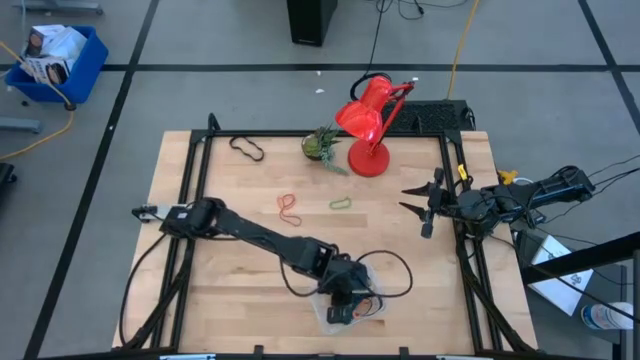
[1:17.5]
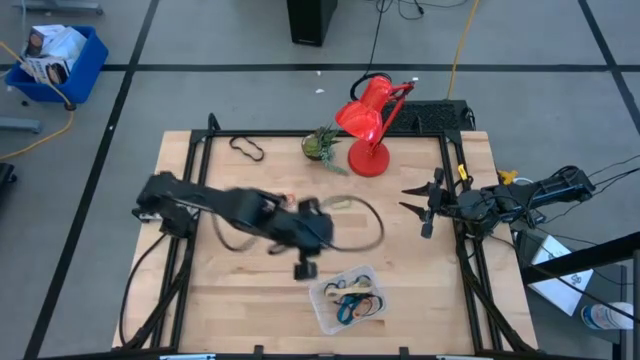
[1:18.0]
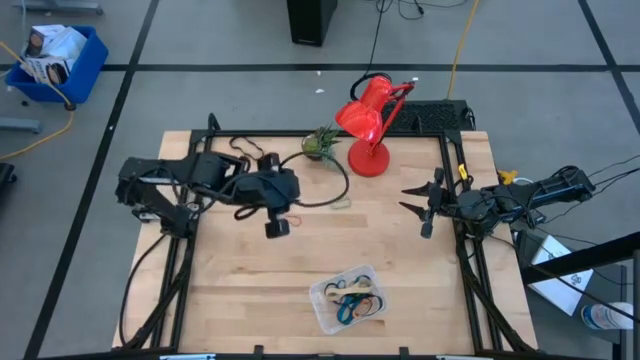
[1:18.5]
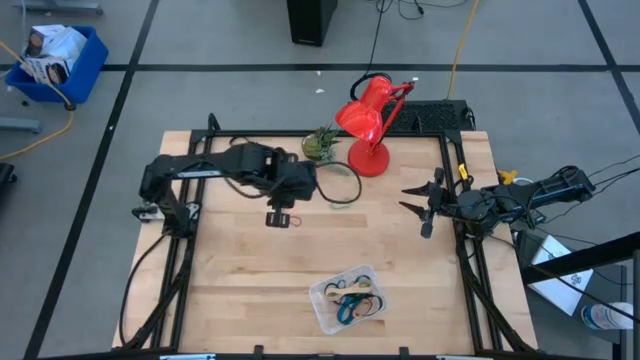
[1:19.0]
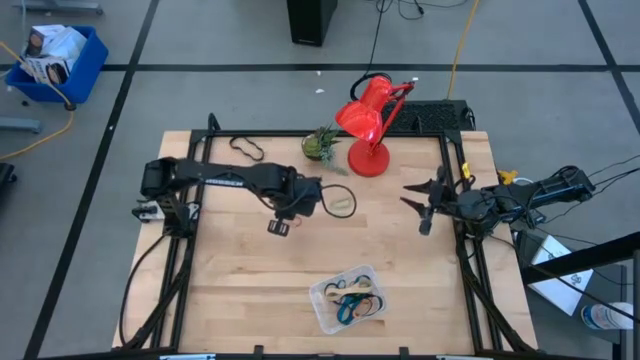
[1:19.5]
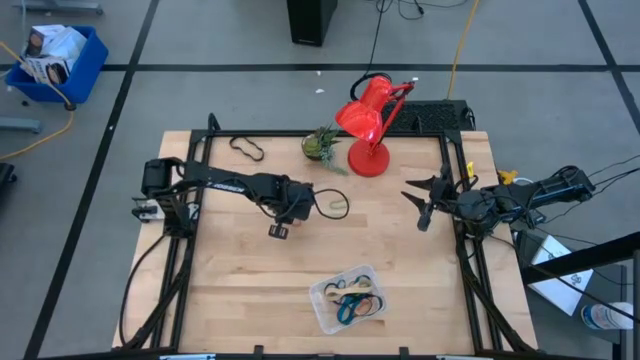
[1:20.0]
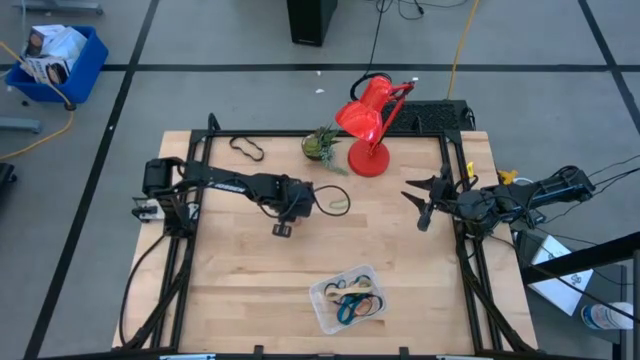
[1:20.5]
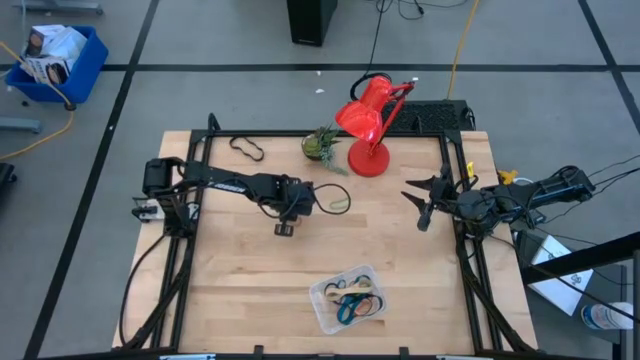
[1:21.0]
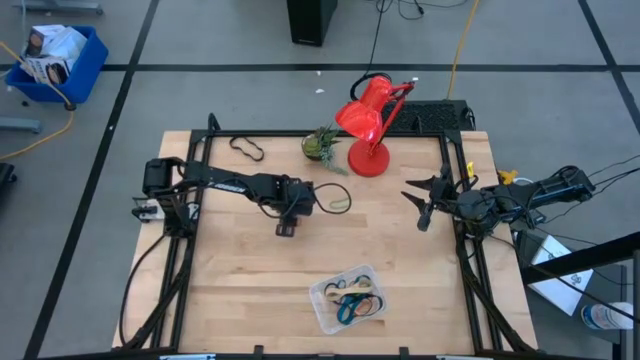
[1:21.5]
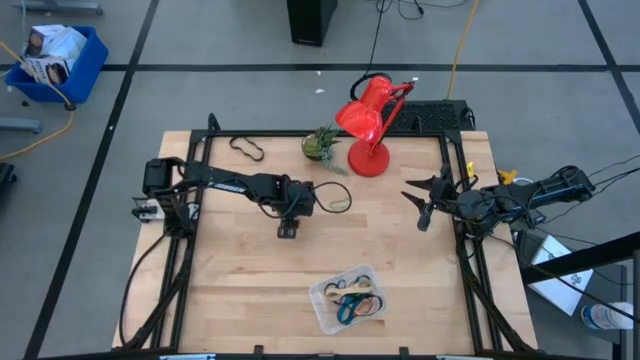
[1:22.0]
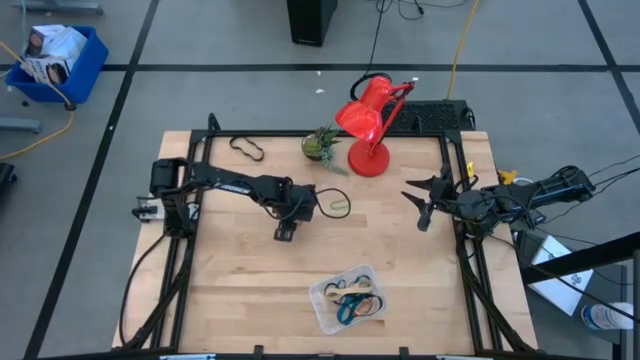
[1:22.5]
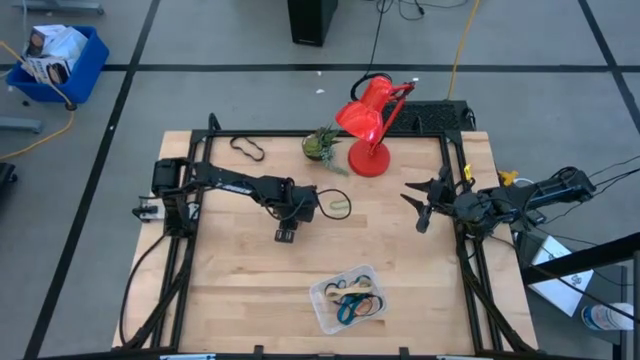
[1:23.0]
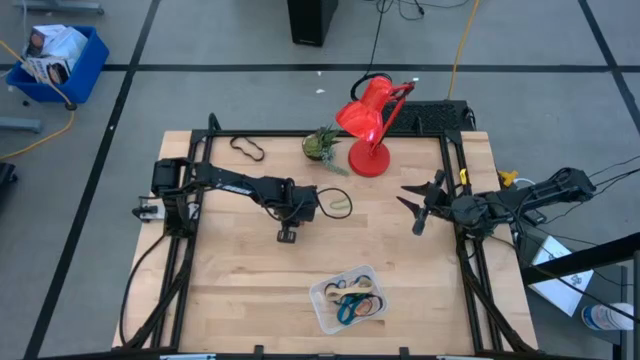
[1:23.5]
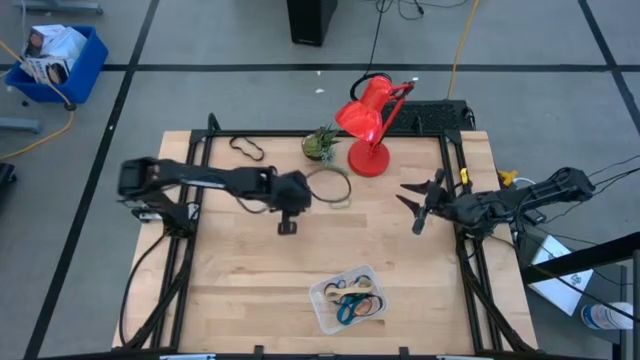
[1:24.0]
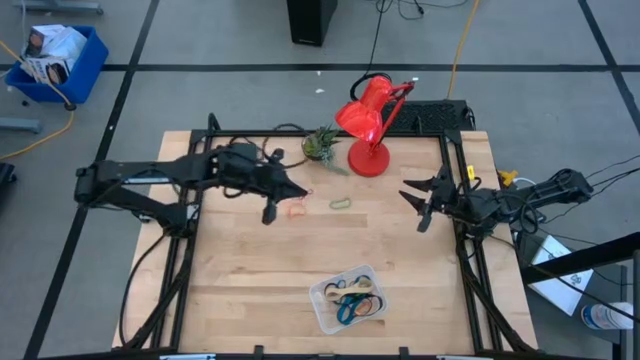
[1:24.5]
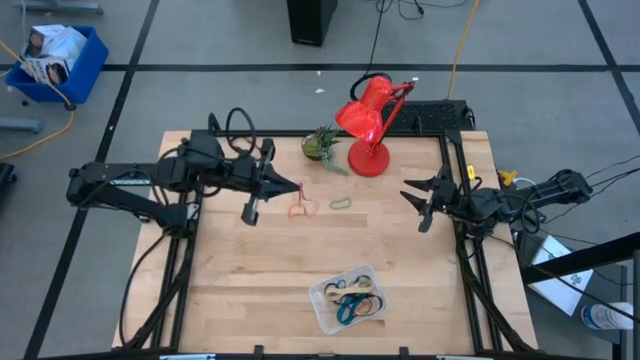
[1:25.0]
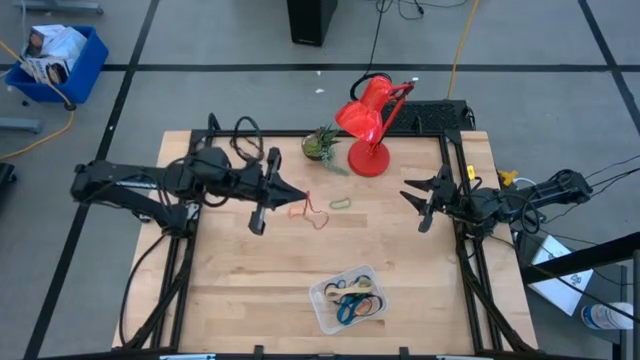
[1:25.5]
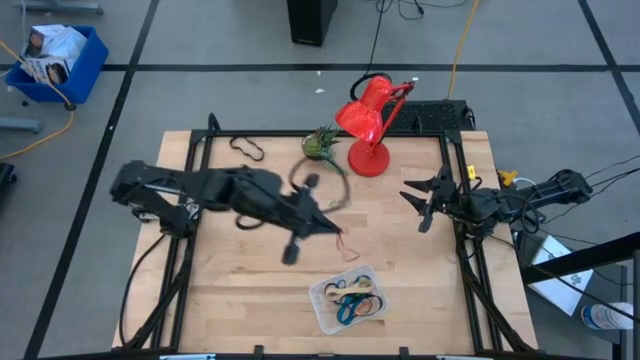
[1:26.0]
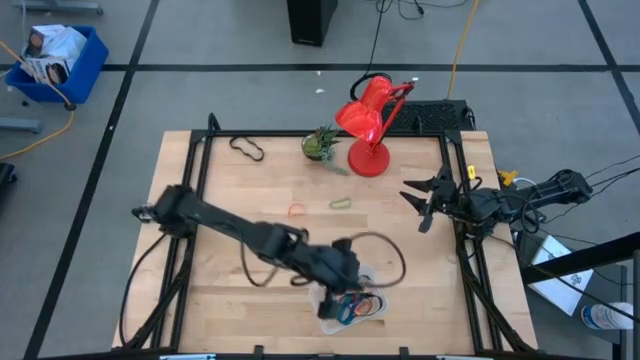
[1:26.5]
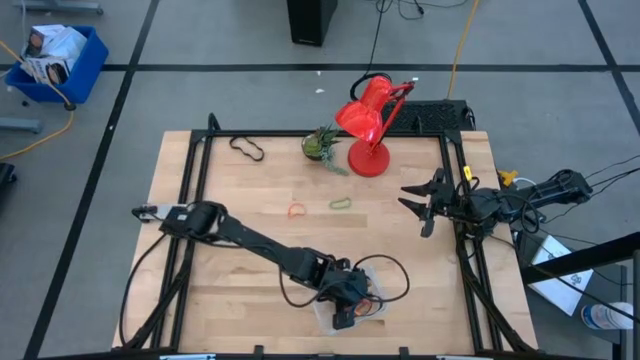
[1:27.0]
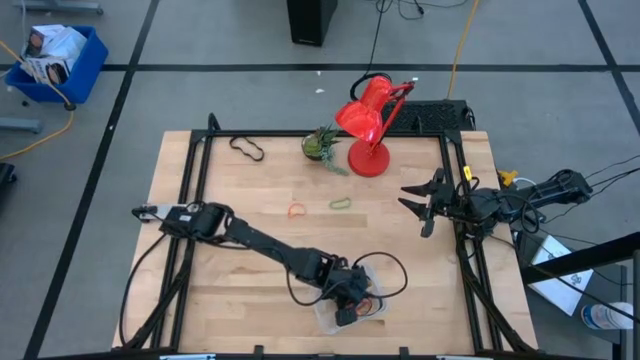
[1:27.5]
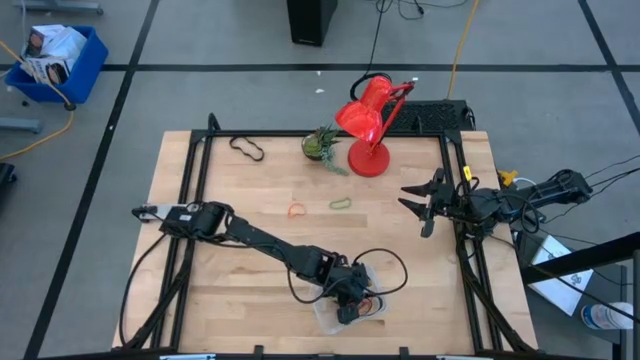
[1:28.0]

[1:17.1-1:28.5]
Task: Pick and place rubber bands into bin
Put the red rubber band into the transparent container

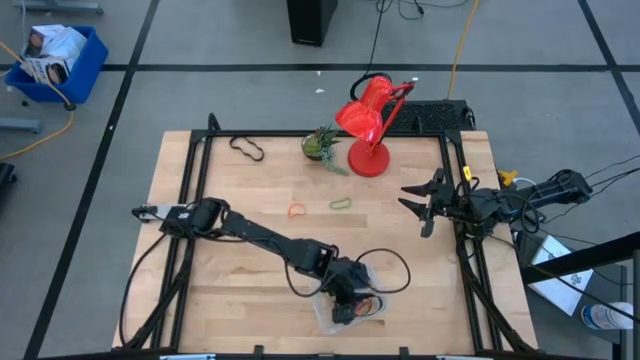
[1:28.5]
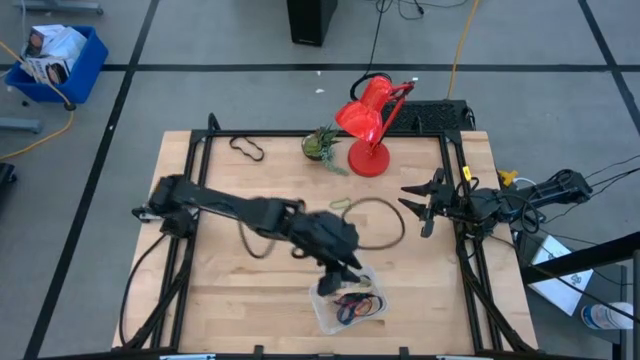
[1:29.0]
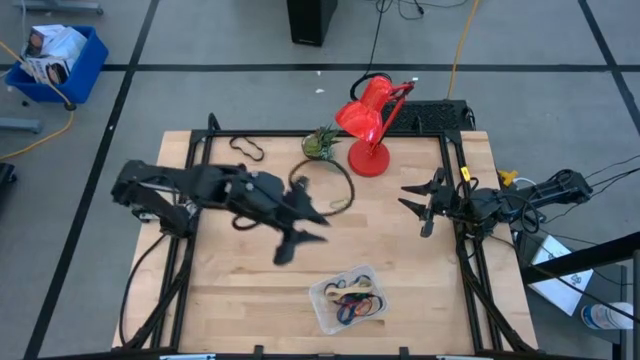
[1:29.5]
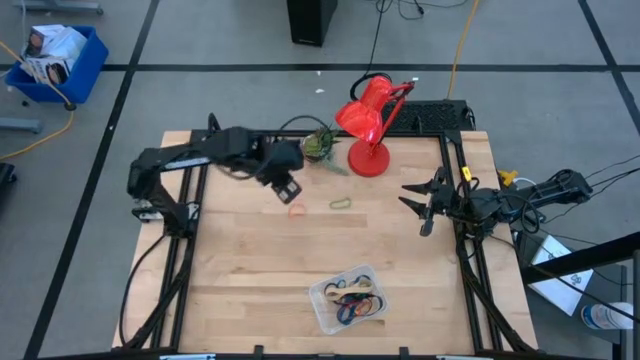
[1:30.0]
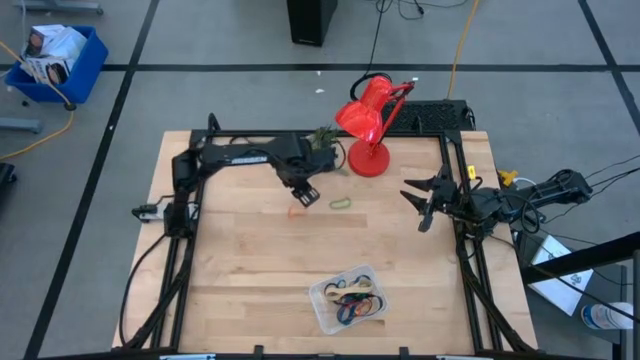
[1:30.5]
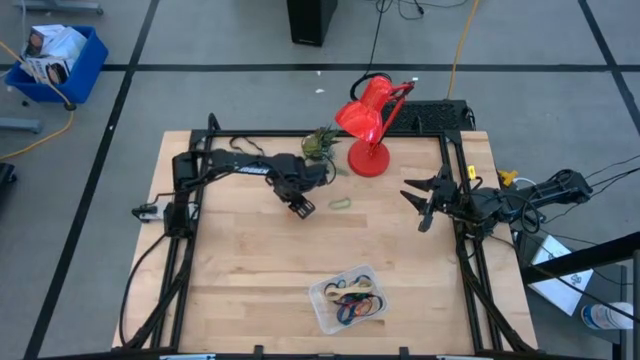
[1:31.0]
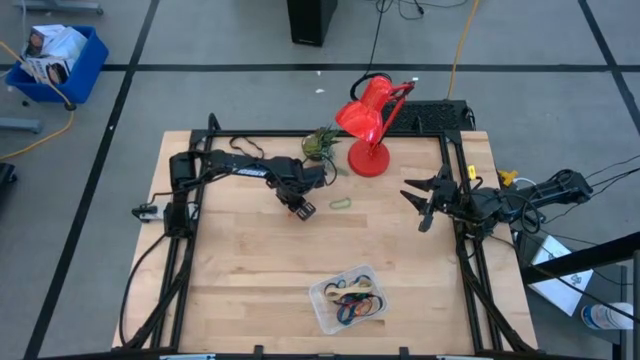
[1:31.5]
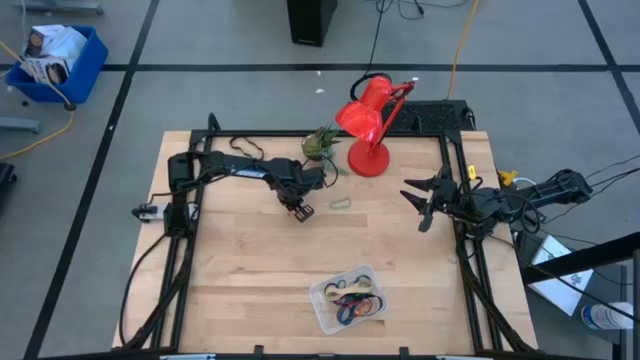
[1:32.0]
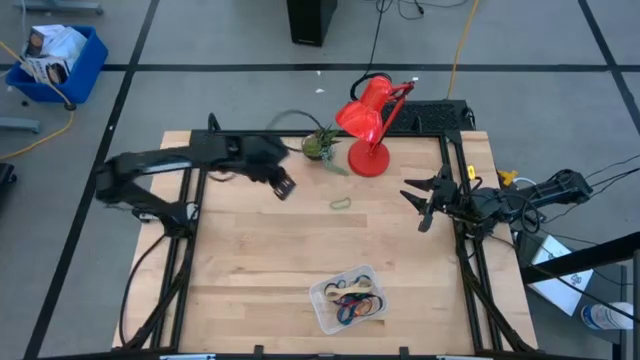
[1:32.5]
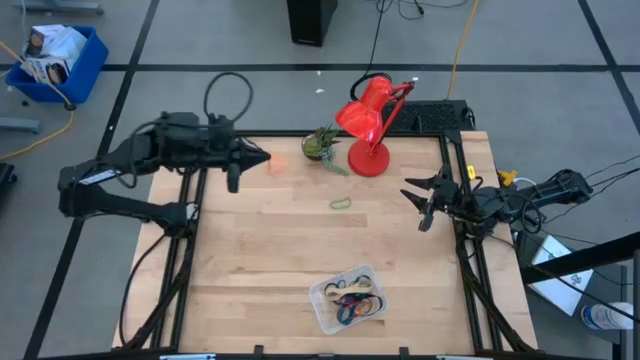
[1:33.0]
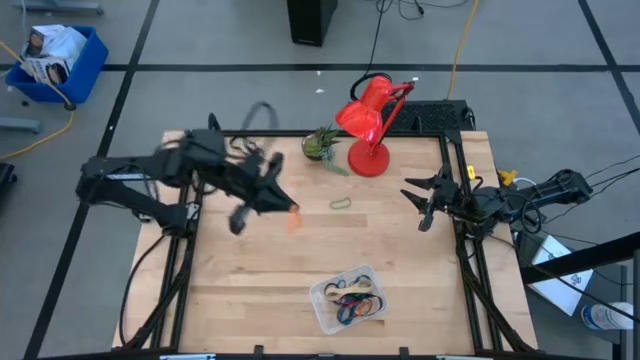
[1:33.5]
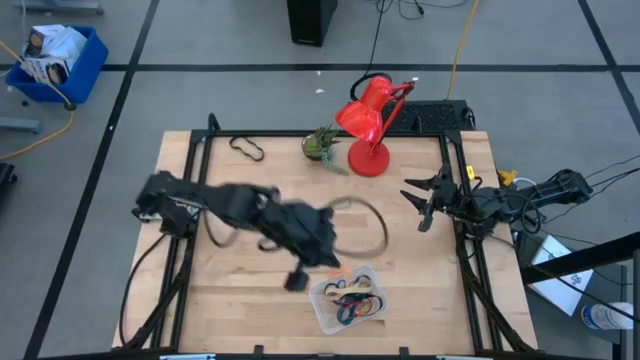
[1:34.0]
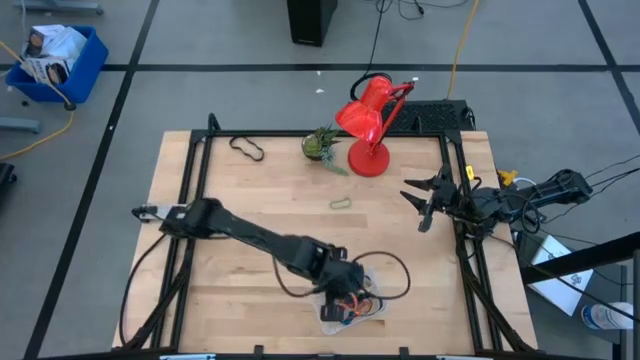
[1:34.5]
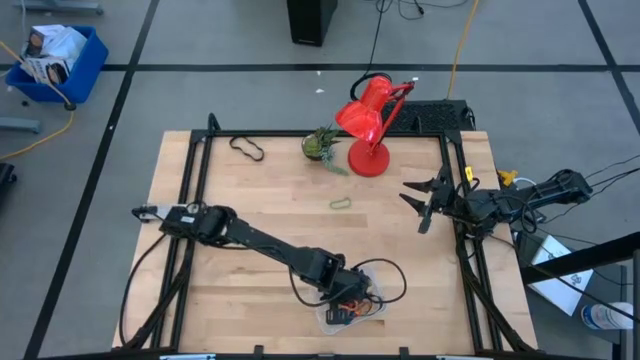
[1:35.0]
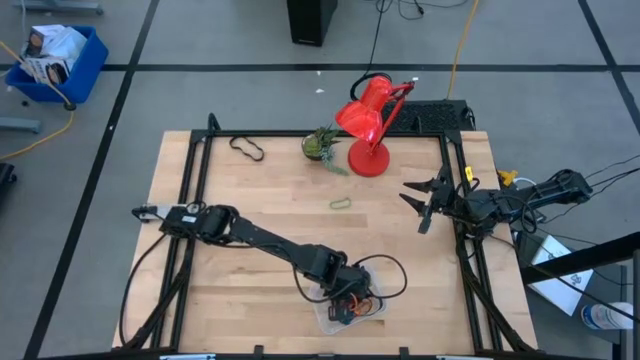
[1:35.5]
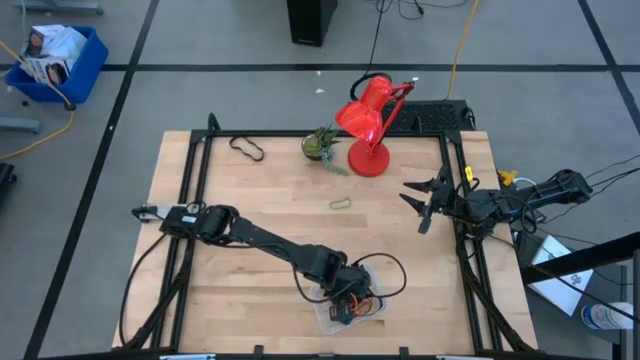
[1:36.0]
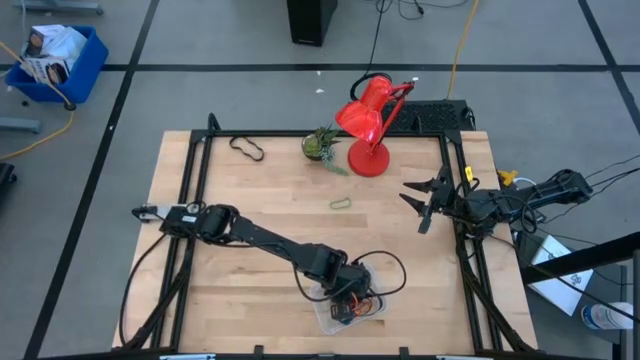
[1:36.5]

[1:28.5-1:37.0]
Put the orange rubber band into the transparent container

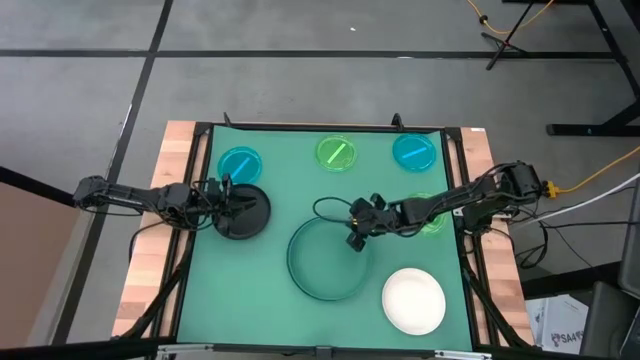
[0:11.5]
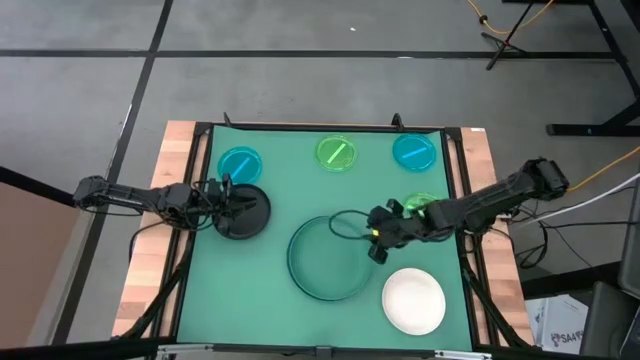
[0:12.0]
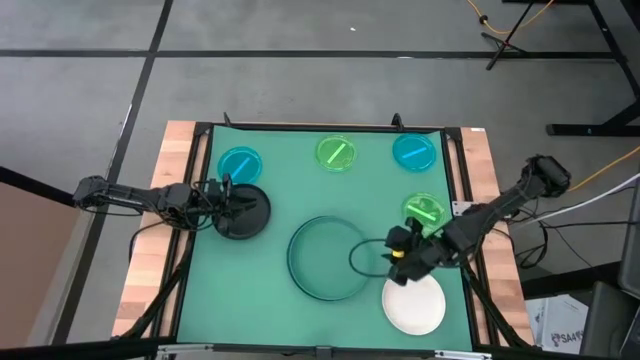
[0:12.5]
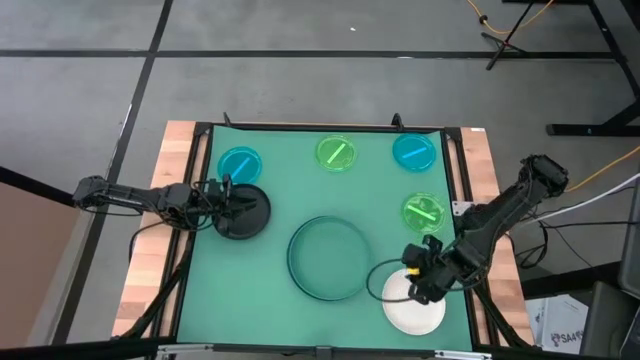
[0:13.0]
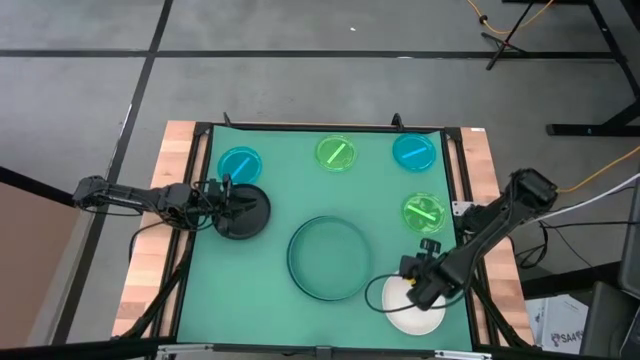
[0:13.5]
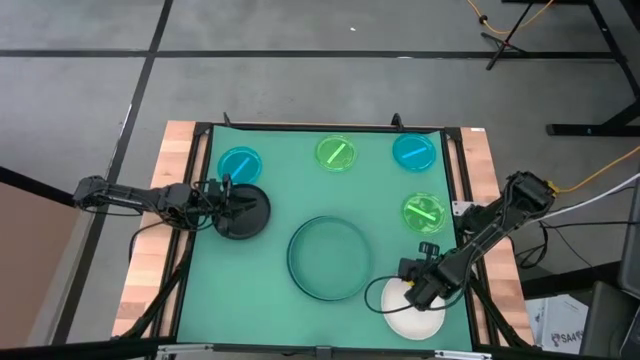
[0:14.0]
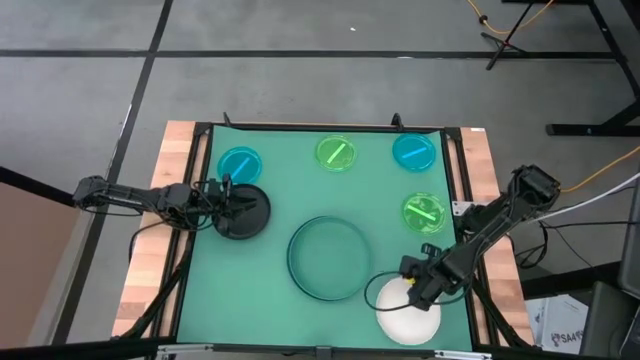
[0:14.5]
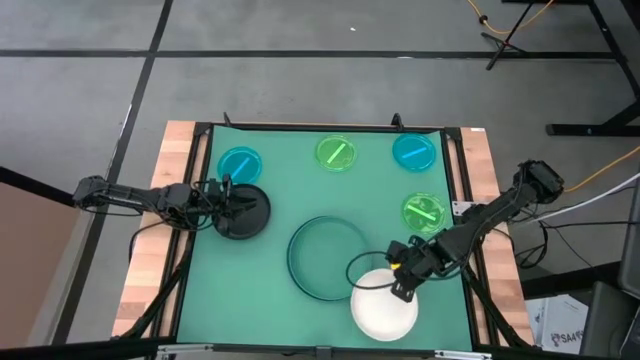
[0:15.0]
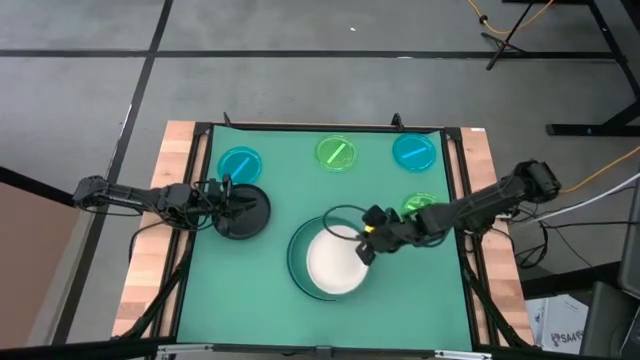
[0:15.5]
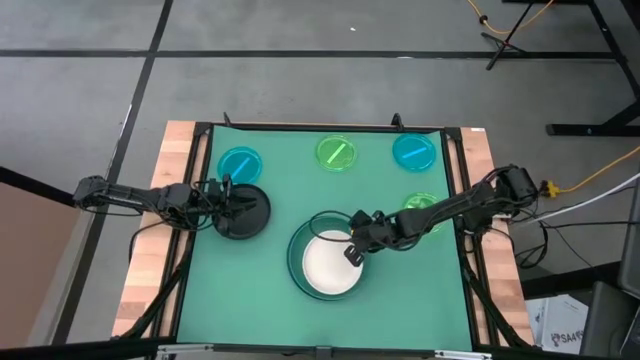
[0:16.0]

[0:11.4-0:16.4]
Task: Stack plastic plates
Stack the white plate on the dark green plate
